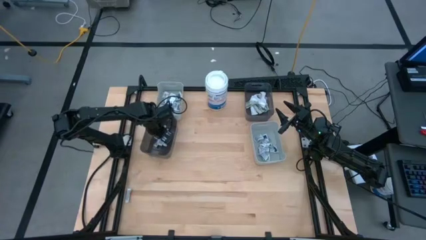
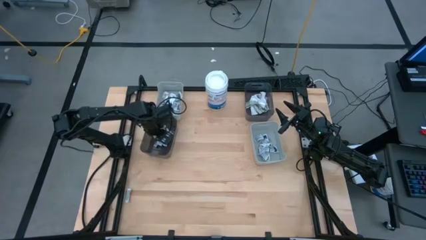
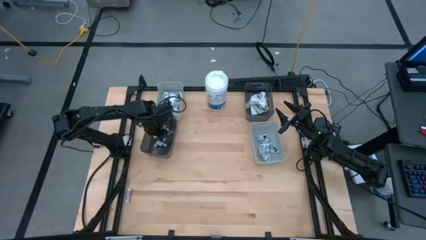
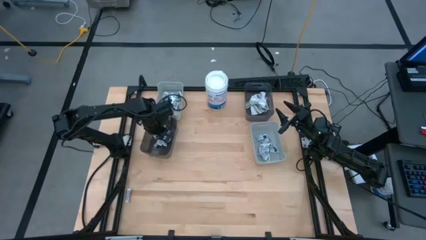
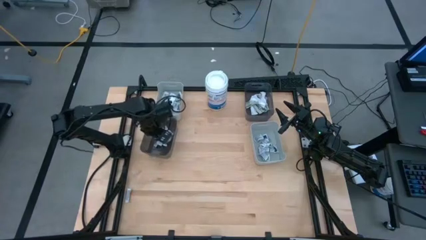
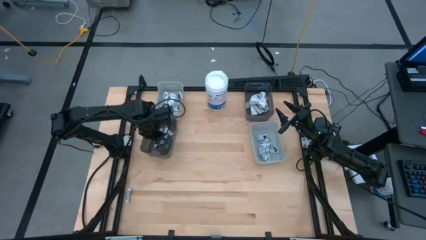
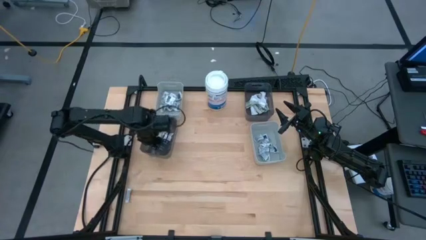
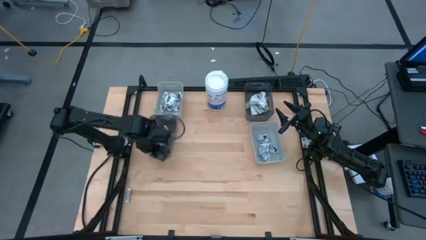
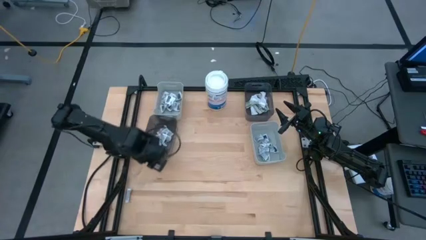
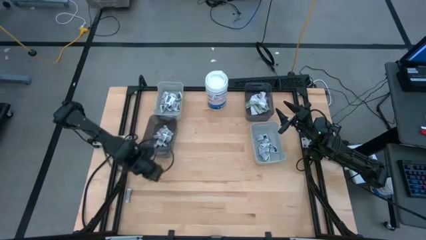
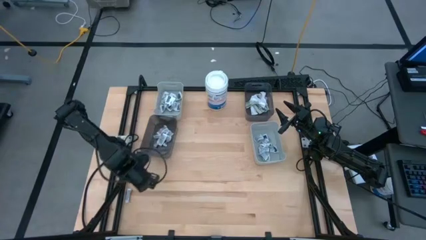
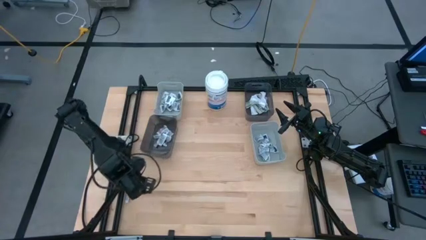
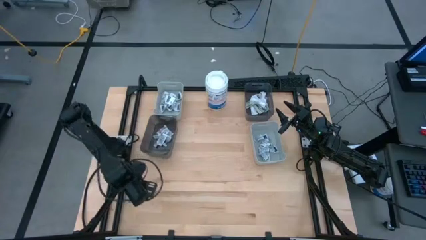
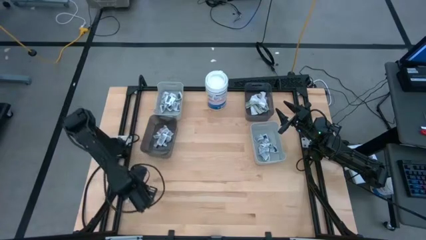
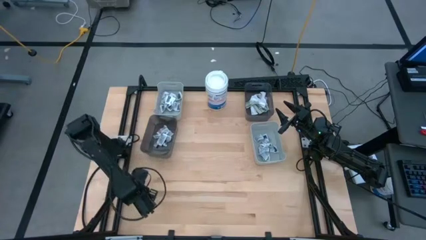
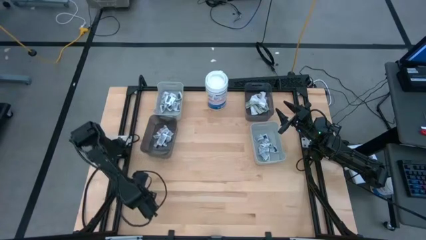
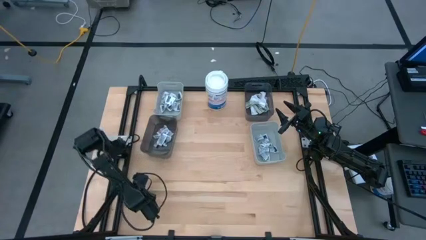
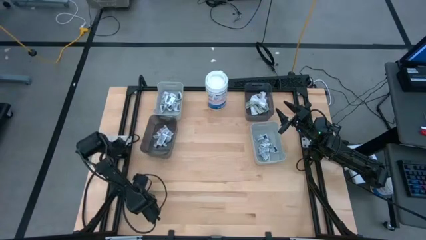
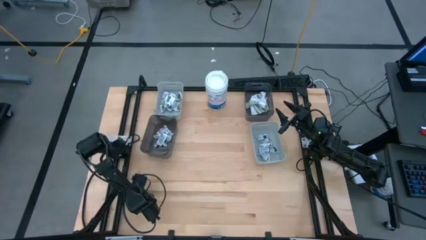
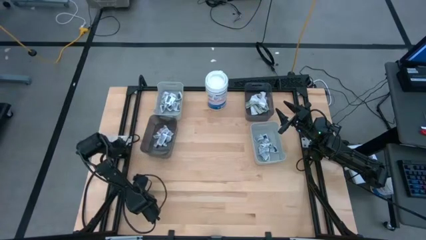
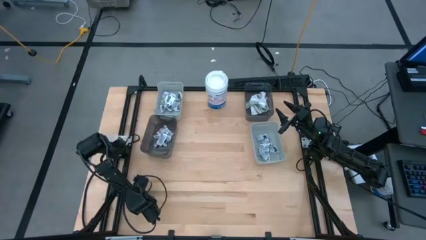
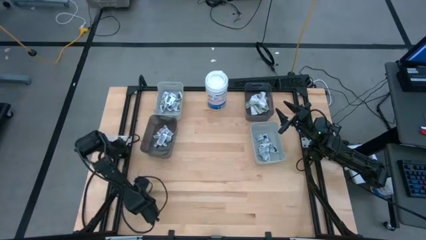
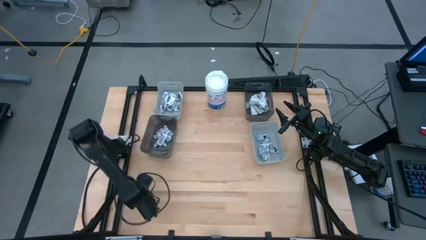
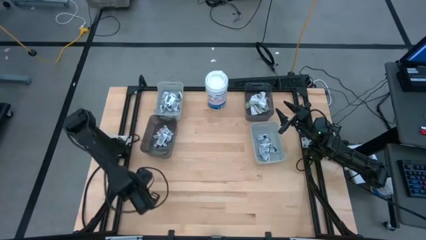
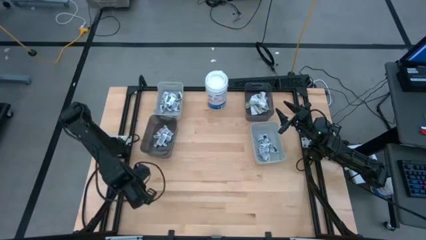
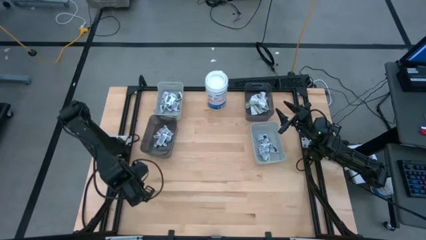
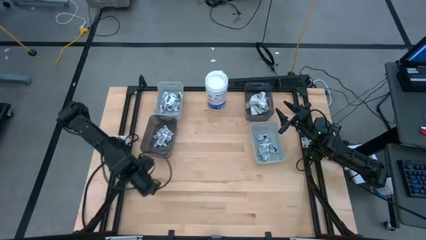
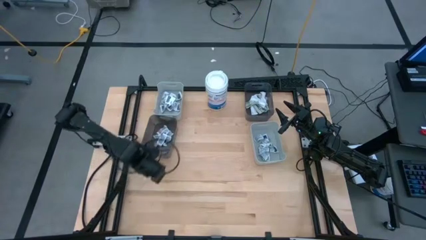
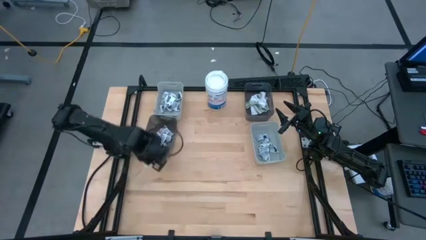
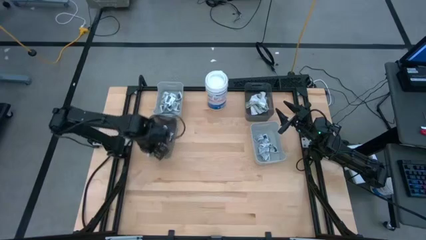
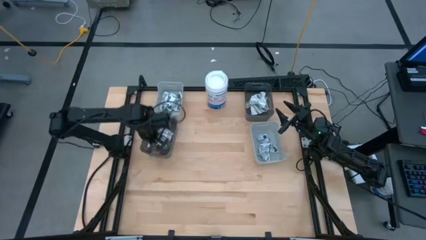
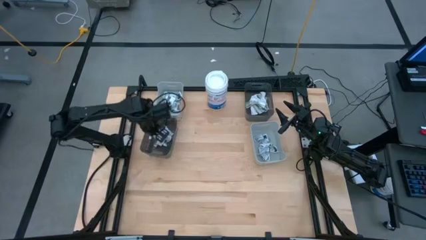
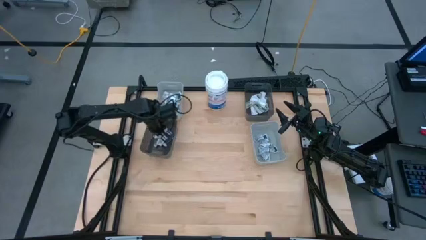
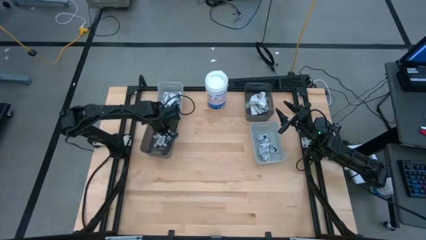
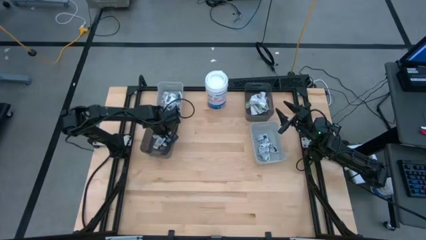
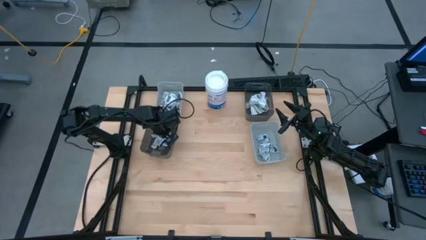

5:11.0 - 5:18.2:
Task: Pick & Place First Aid Supplies
Put the orange ointment pack into the left black bin

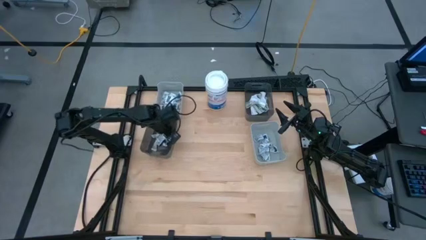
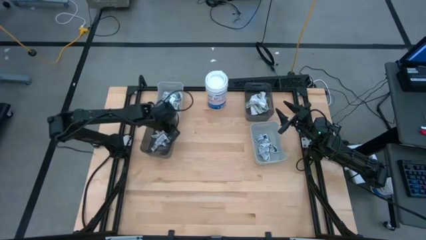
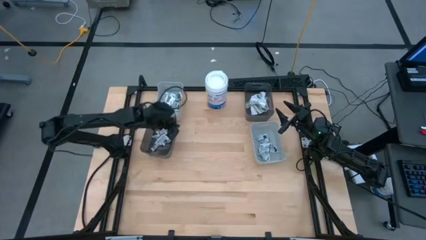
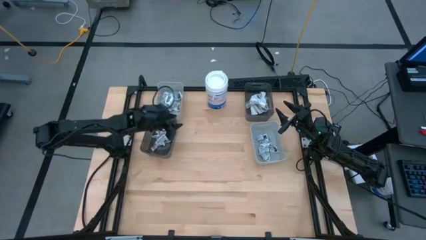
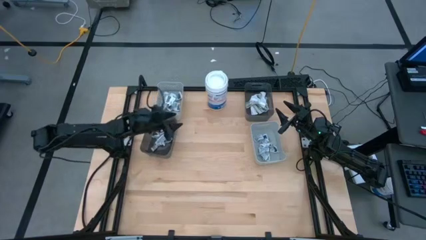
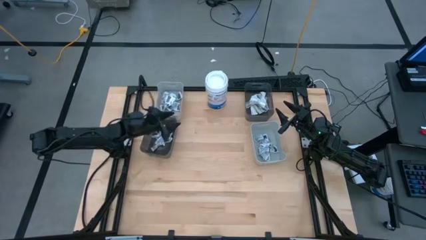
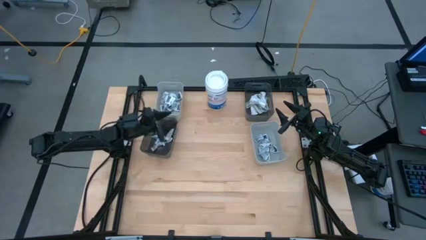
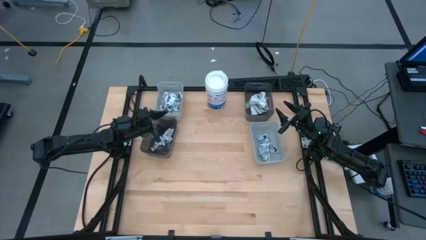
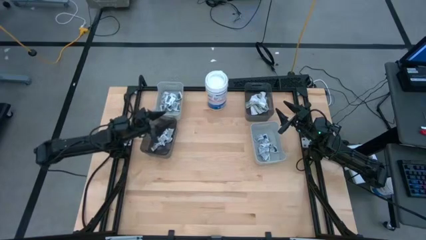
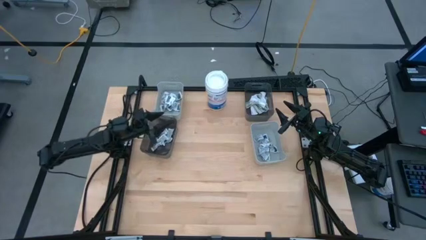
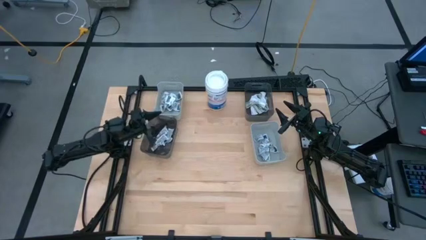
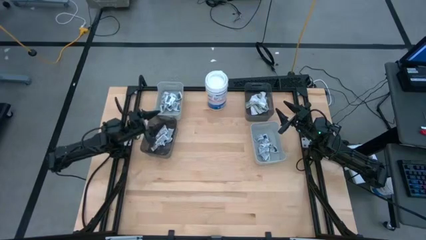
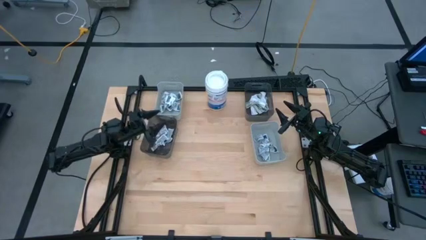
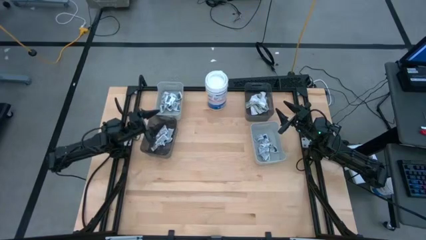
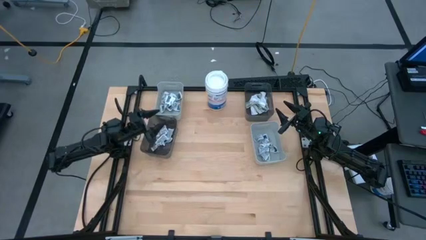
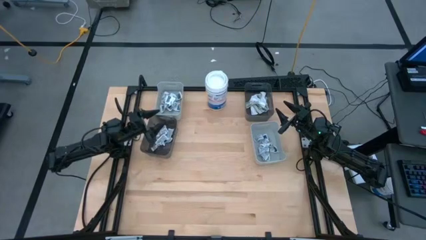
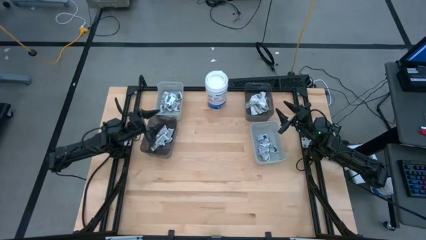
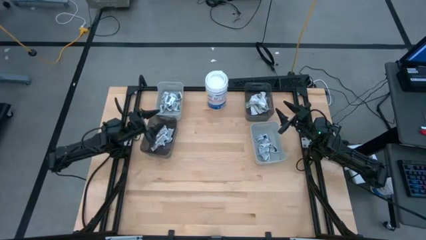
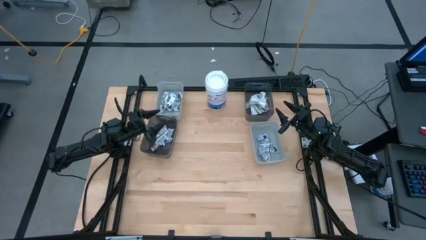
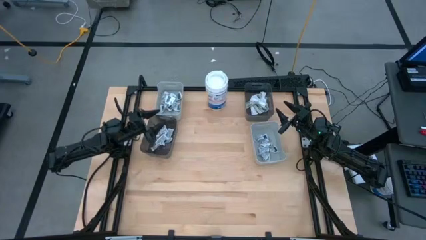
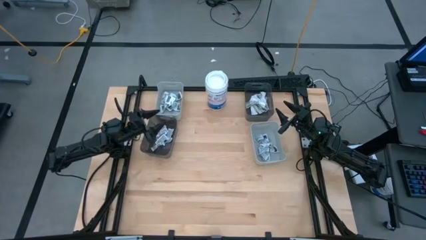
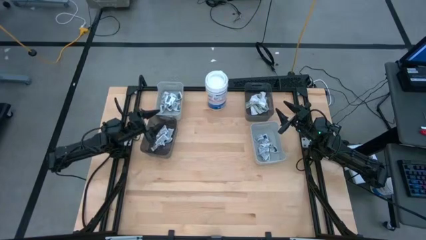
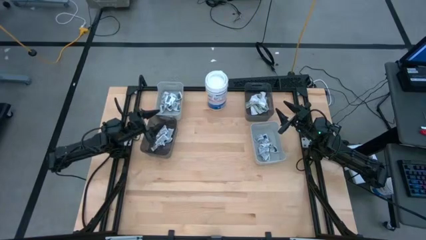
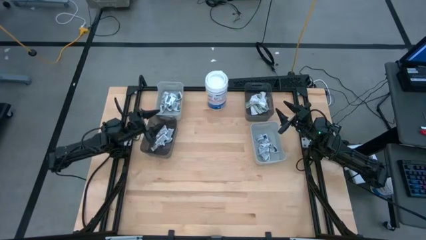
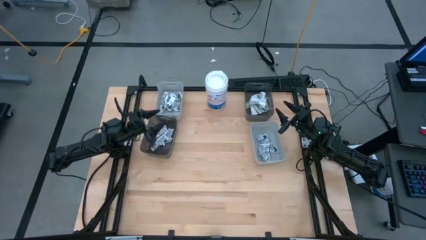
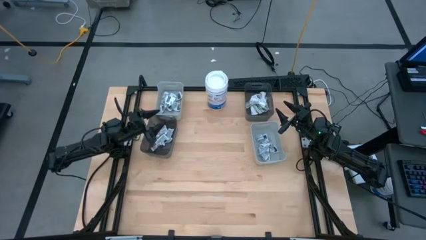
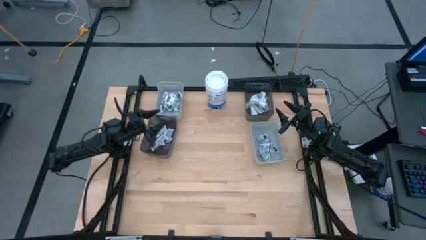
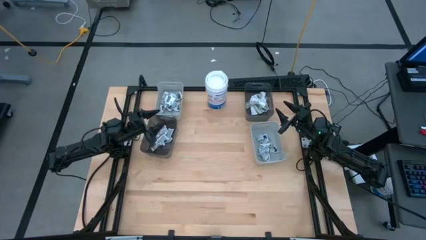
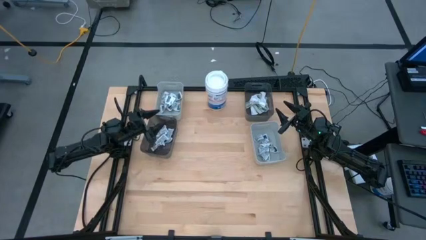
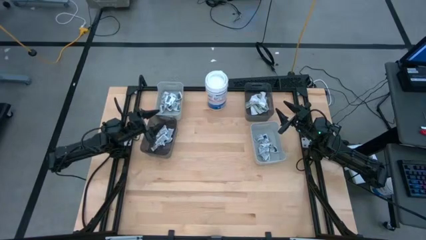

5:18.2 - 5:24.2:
Return to Home Position
